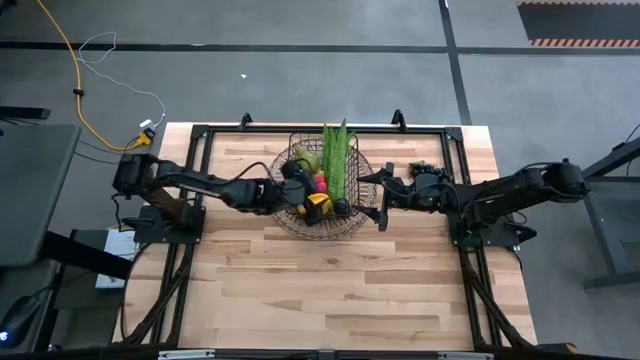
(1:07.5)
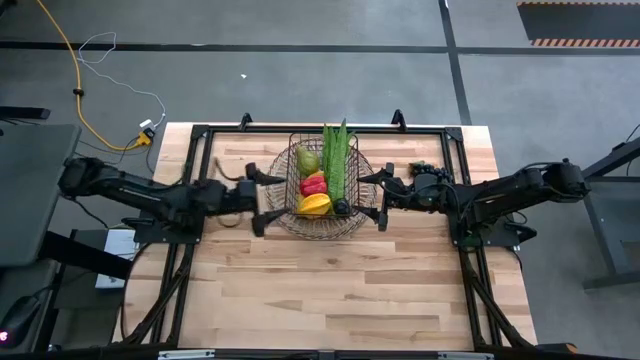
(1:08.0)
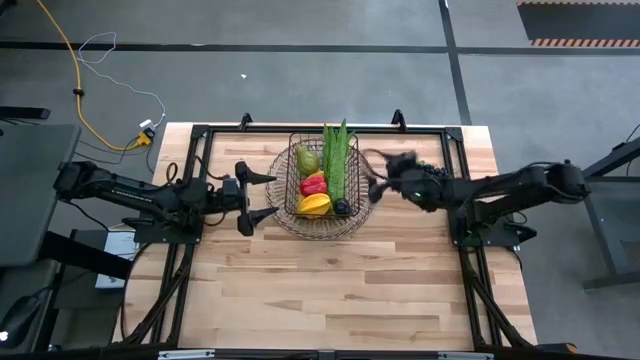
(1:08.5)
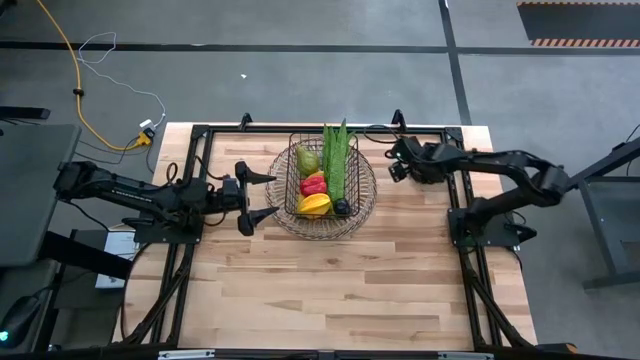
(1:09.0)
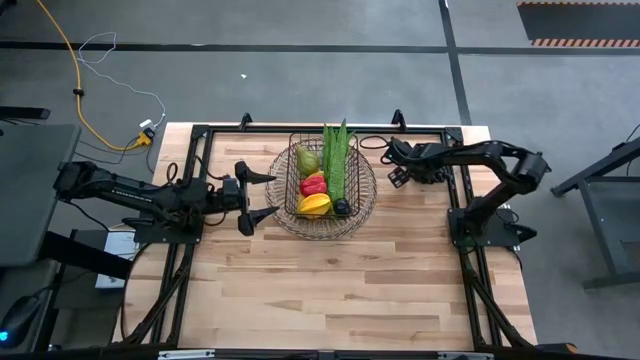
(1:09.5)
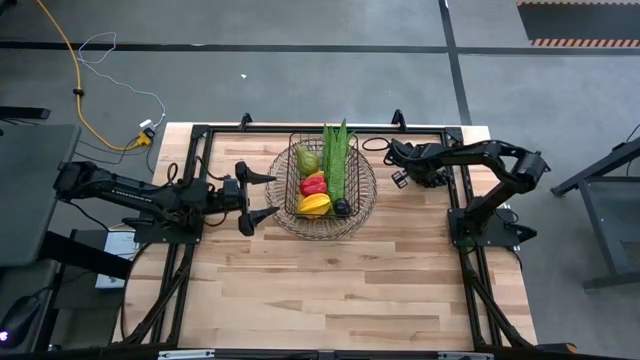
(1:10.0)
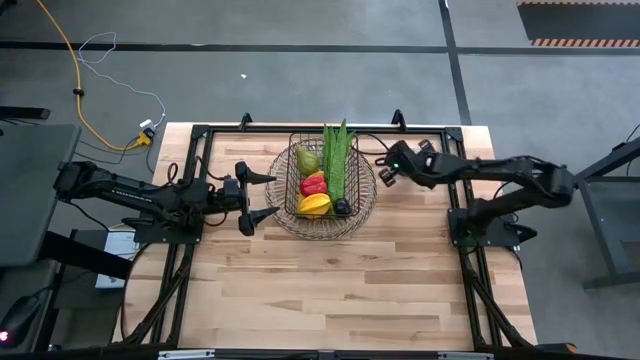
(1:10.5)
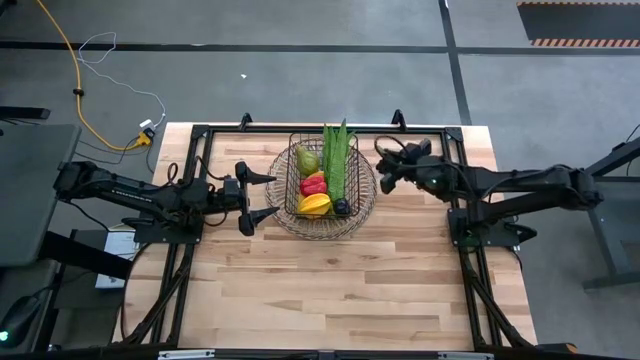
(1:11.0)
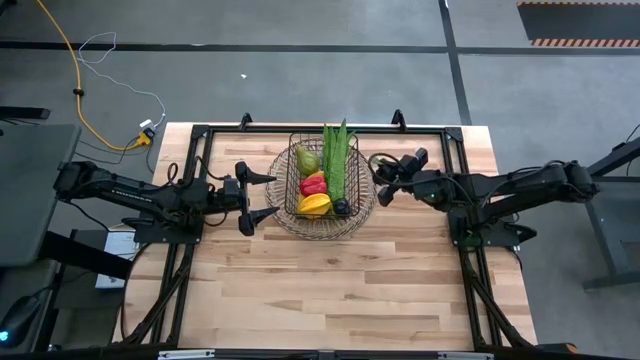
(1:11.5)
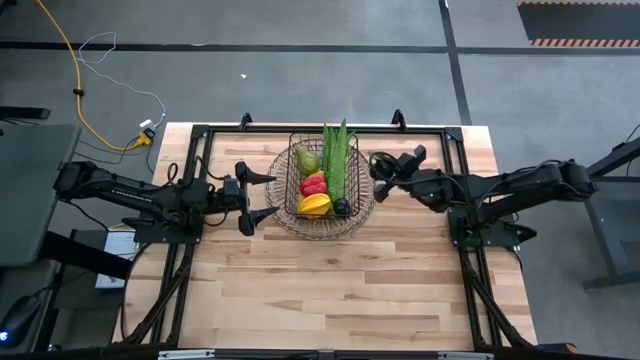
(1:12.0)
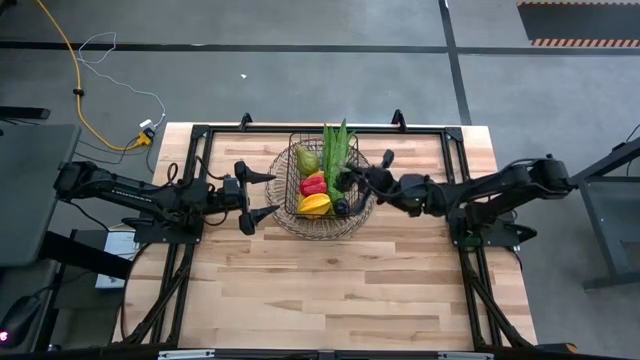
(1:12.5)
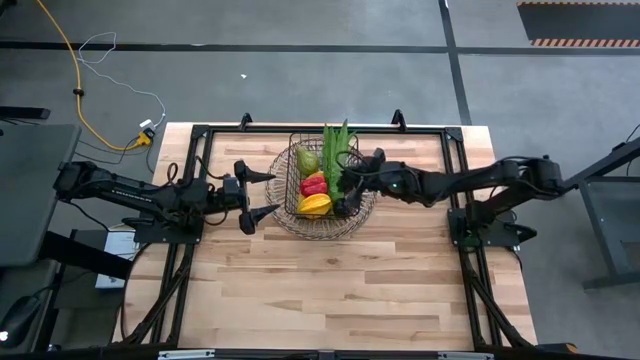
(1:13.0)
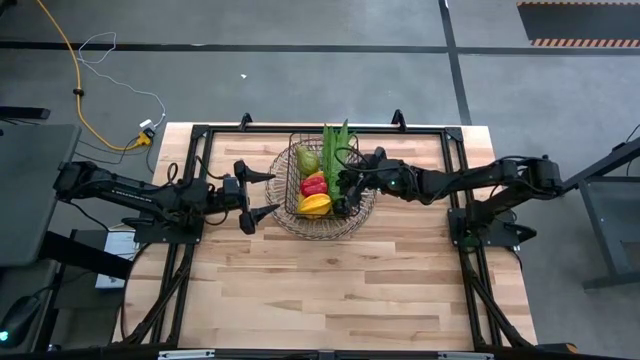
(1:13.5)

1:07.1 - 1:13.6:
Task: Build produce basket
Put the black grapes into the black wire basket

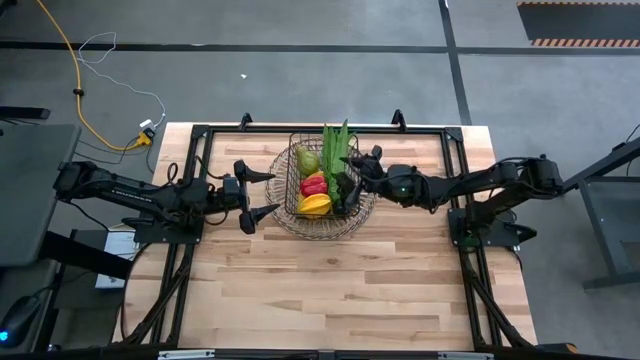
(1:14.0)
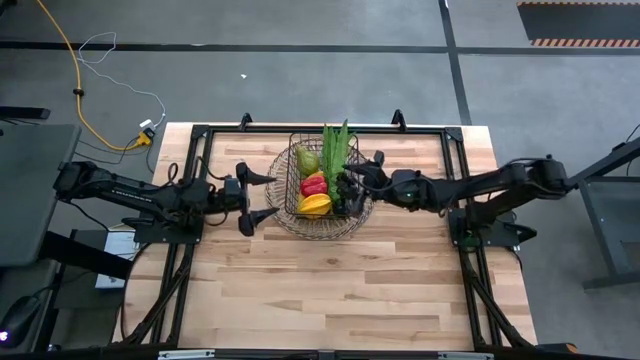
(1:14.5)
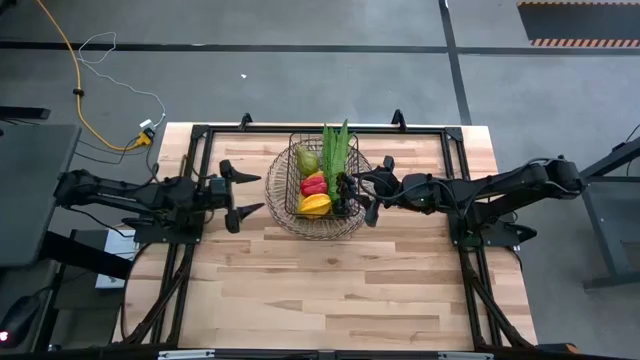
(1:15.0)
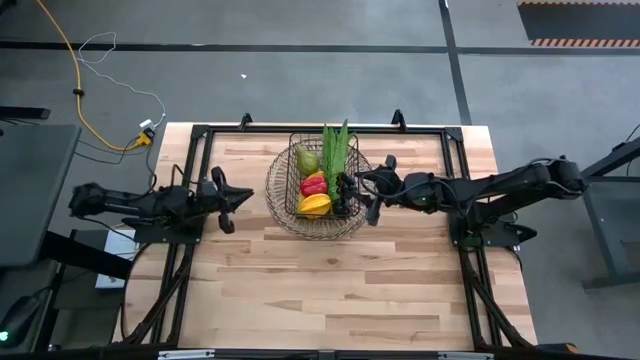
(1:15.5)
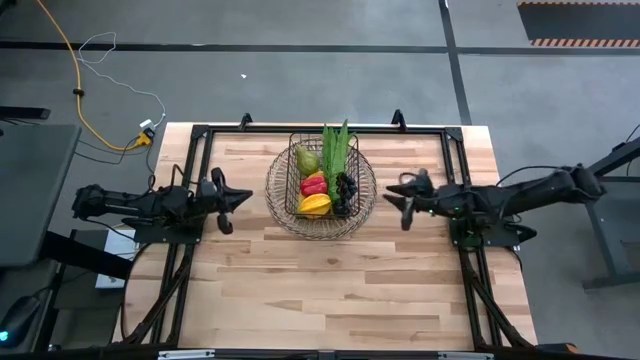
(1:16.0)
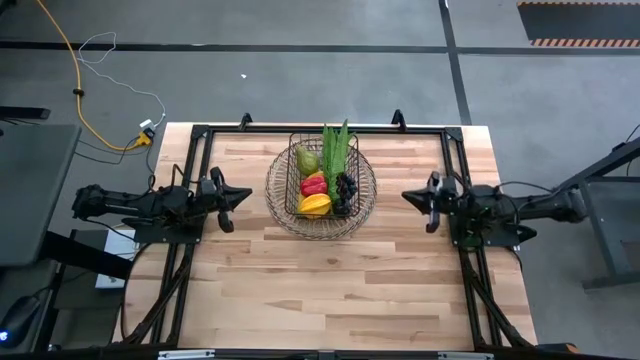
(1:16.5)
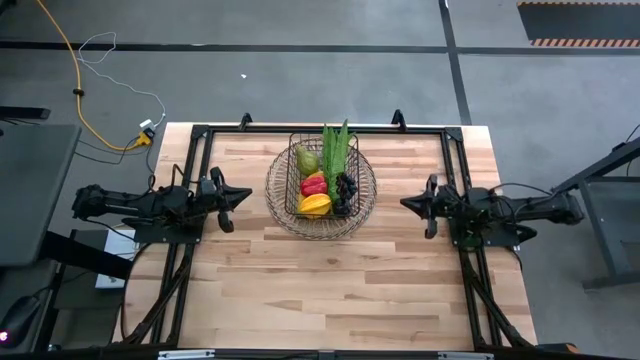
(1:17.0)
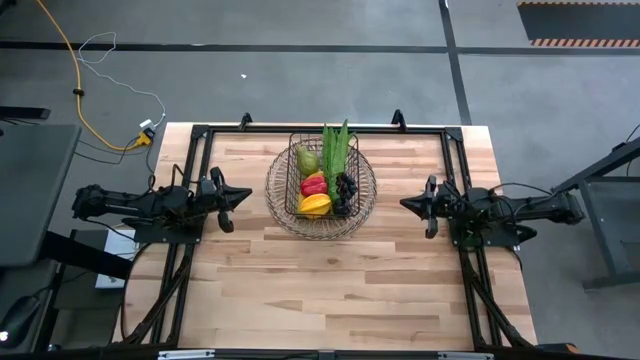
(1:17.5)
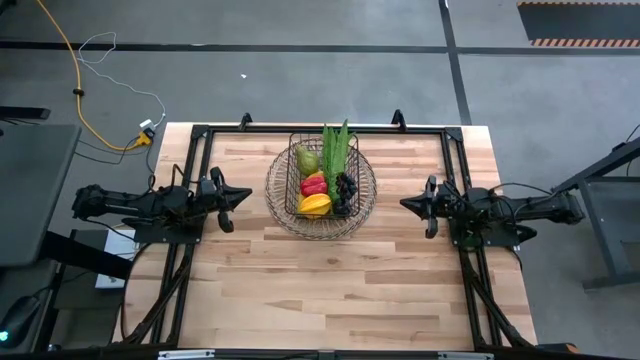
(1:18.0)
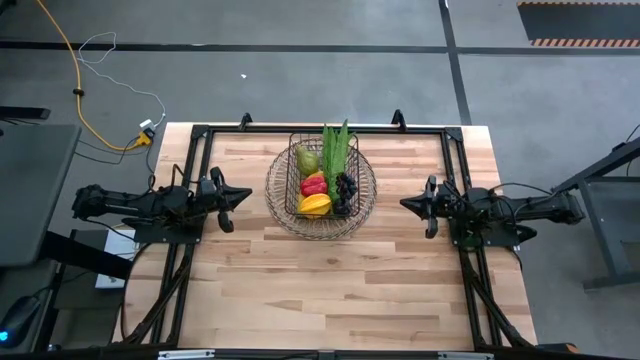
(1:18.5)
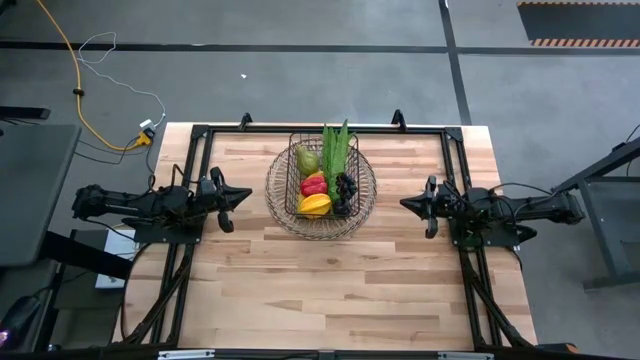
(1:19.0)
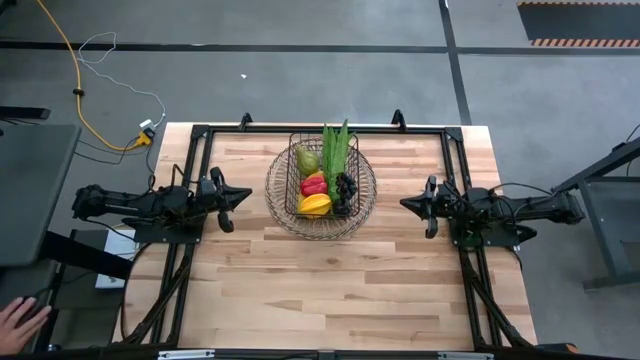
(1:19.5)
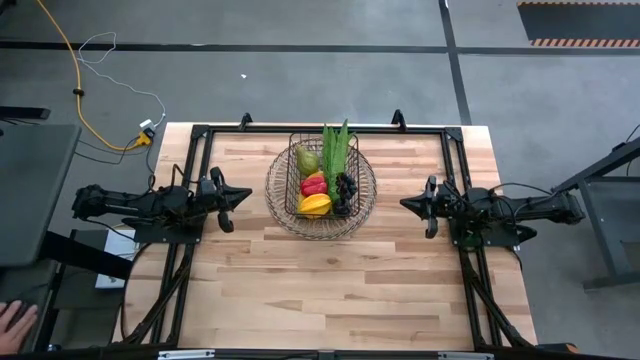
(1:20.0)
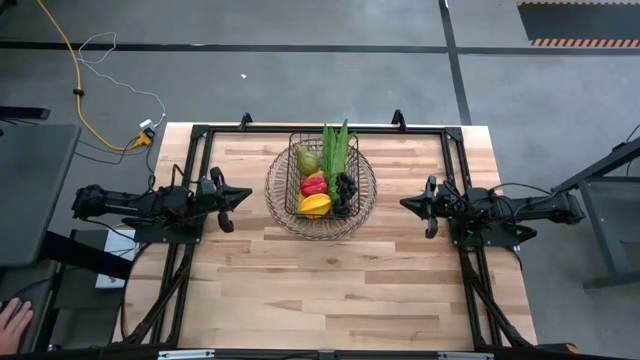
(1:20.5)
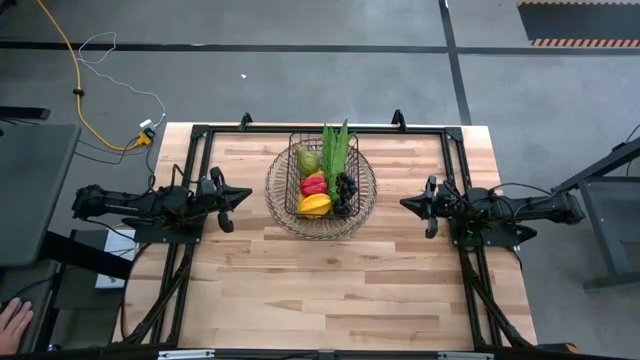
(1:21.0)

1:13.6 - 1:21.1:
Return to Home Position

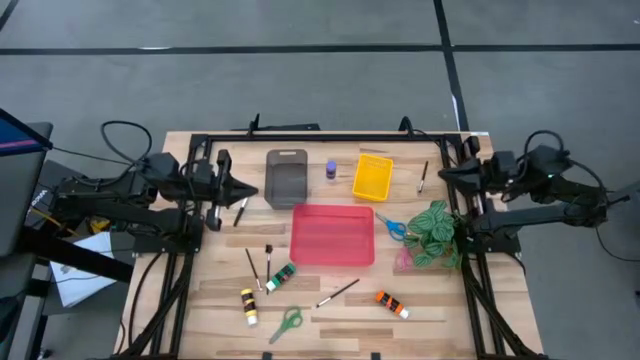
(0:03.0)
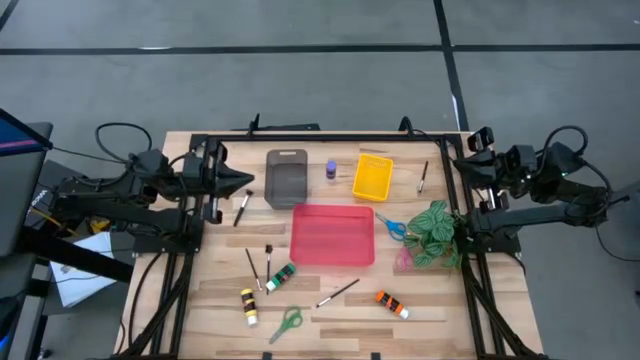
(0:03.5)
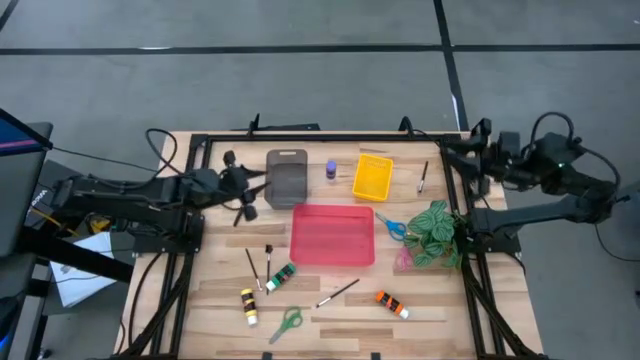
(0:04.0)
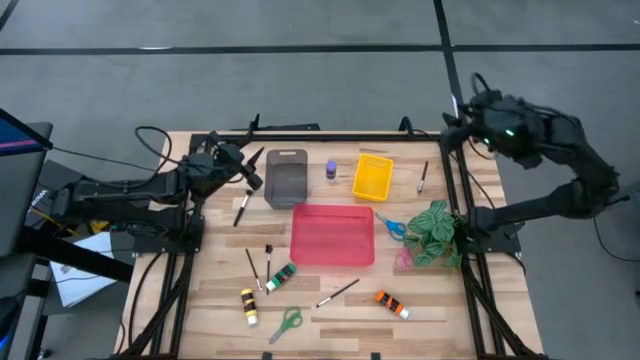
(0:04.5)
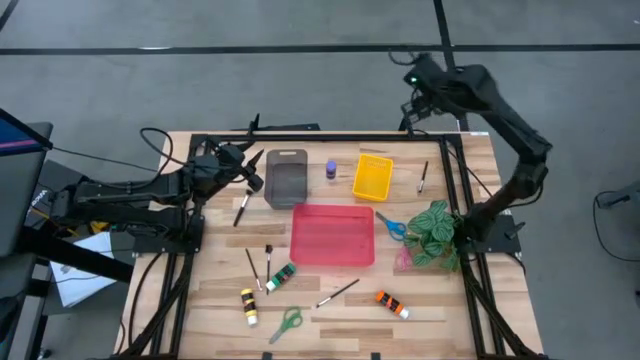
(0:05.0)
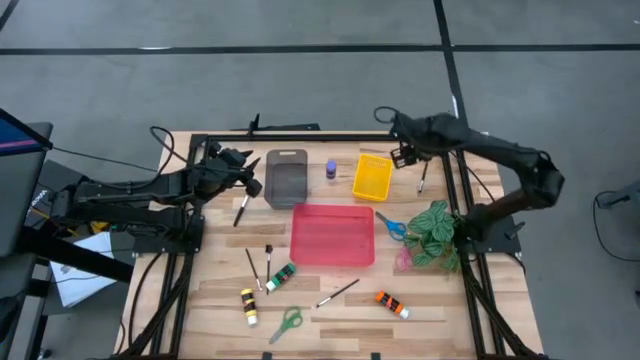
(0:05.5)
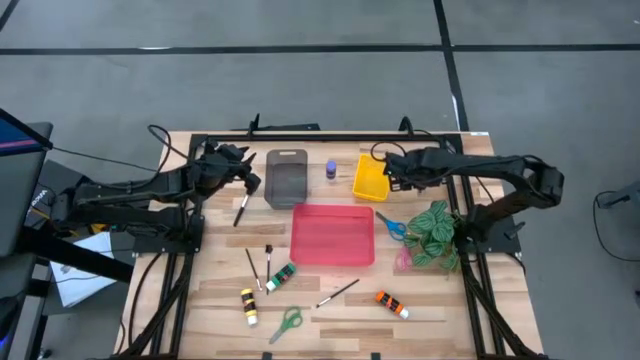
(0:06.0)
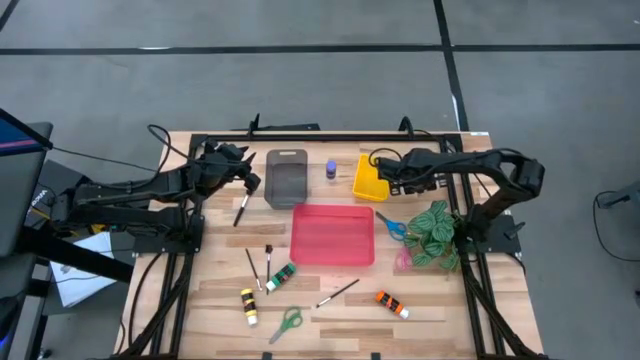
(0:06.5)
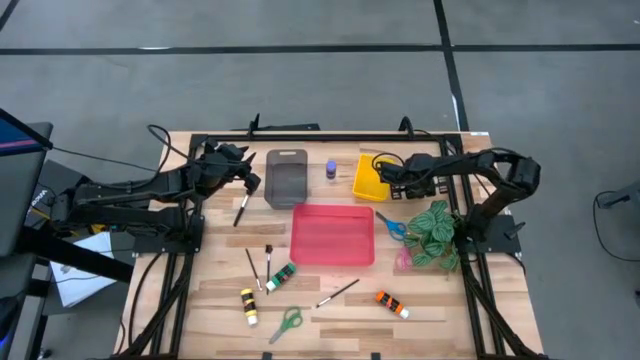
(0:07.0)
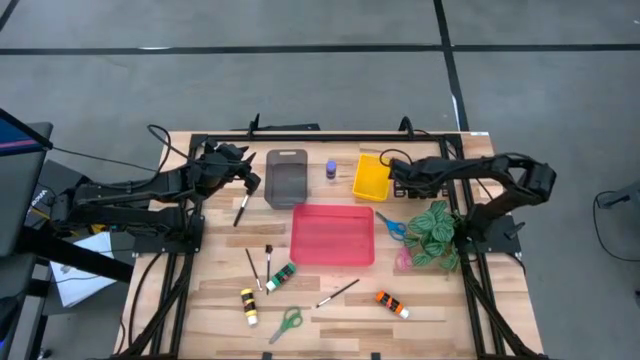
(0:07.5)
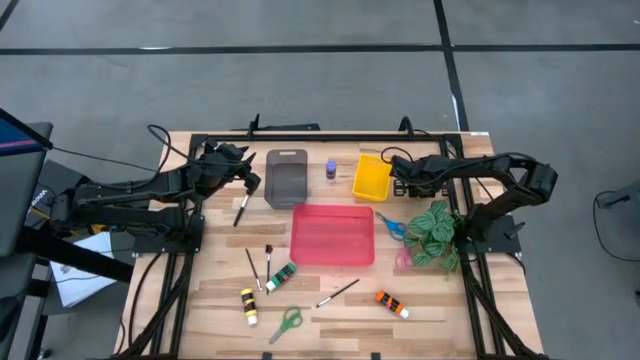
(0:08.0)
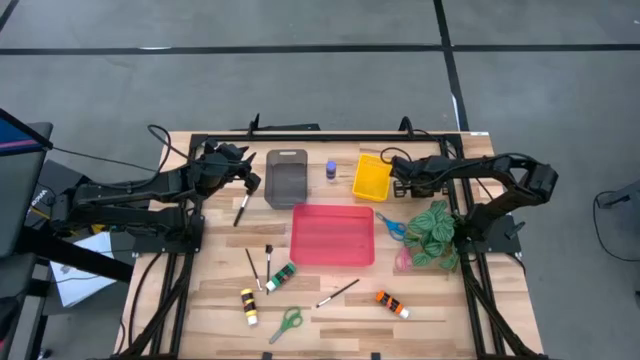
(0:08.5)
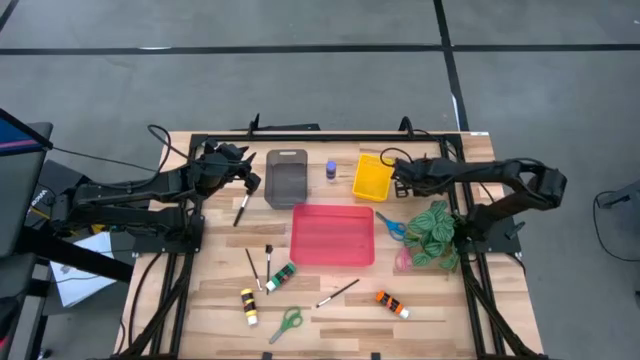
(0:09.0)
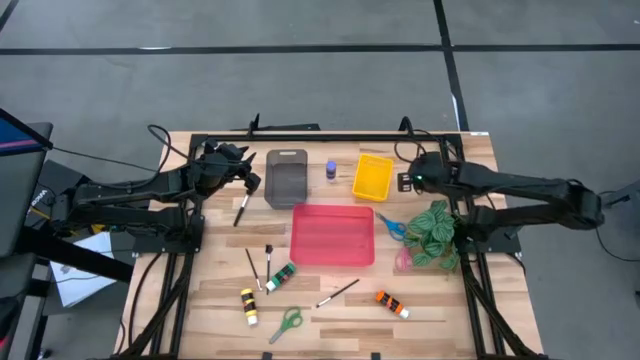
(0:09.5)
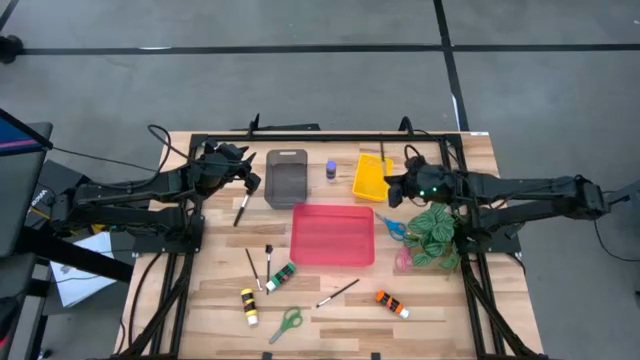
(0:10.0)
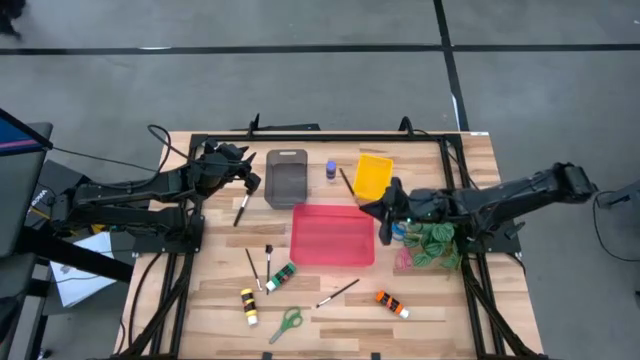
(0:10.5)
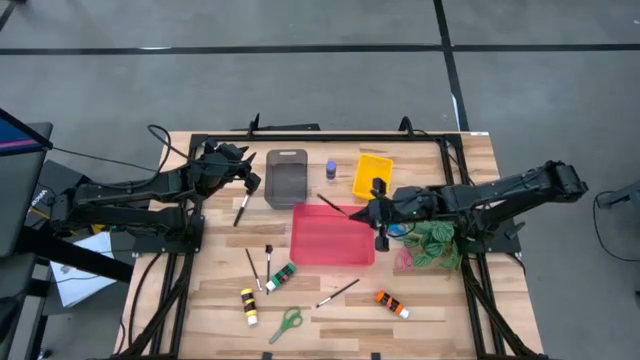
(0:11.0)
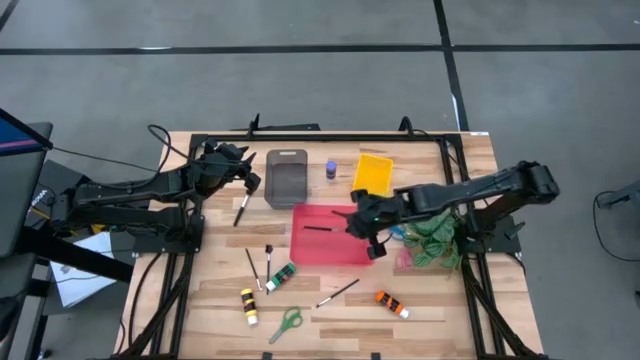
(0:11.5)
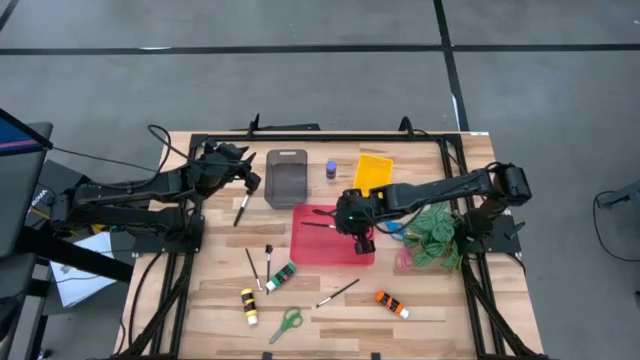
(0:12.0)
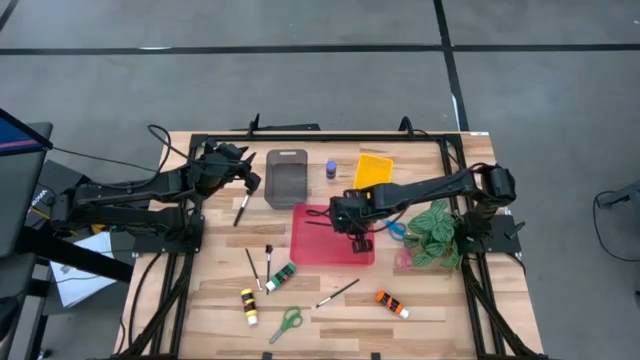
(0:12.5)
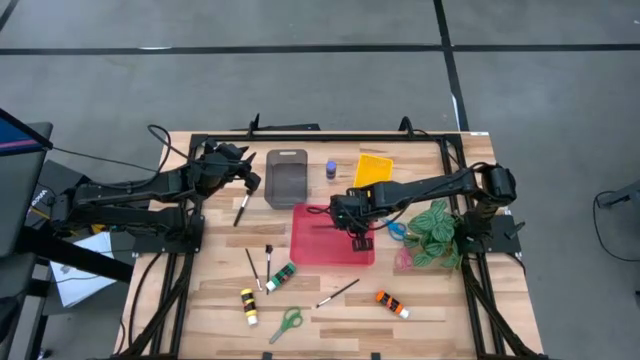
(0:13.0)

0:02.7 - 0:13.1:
Task: Pick & Place Paint Supplies
Put the black makeup brush into the red bin
